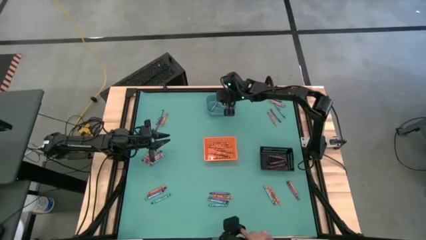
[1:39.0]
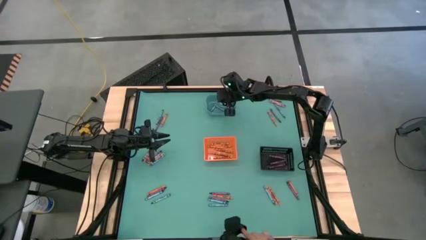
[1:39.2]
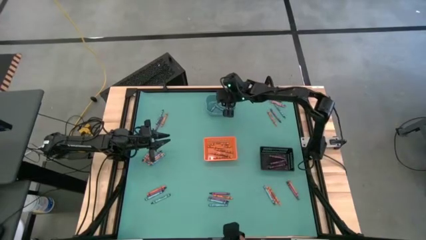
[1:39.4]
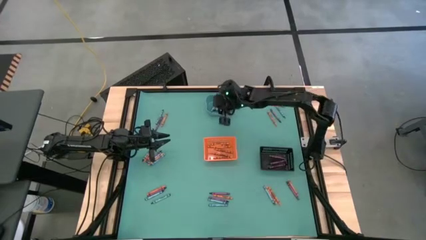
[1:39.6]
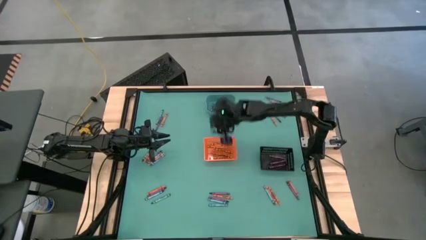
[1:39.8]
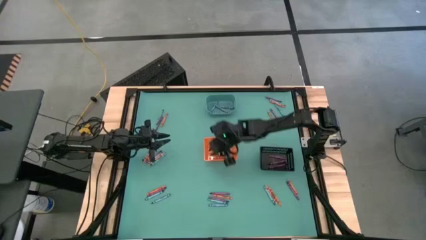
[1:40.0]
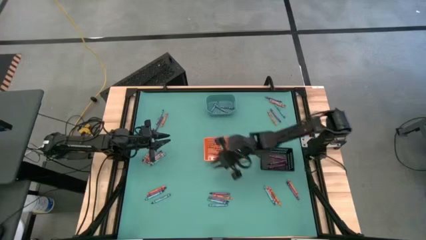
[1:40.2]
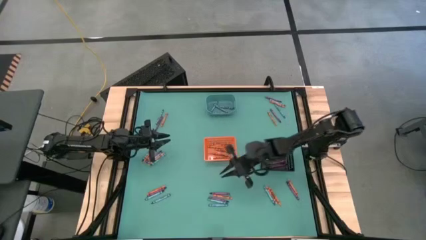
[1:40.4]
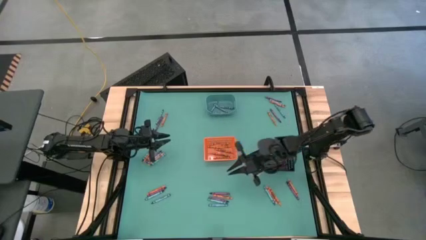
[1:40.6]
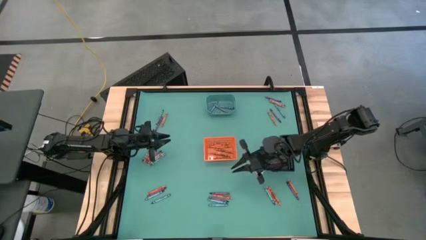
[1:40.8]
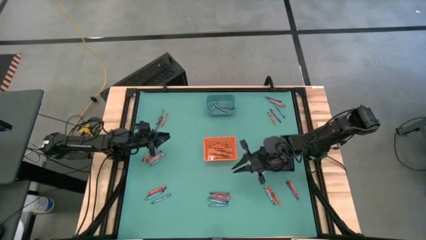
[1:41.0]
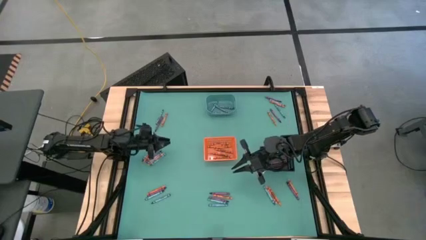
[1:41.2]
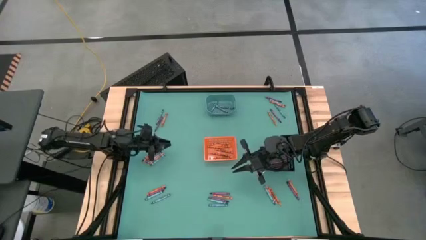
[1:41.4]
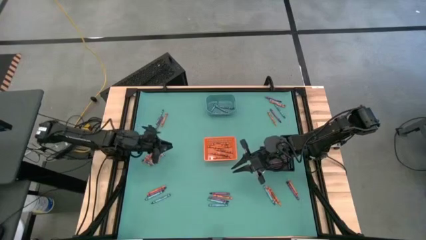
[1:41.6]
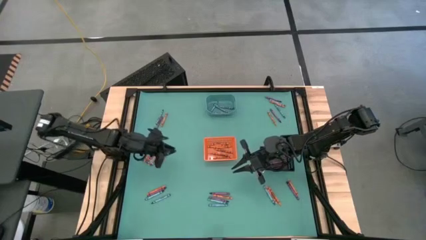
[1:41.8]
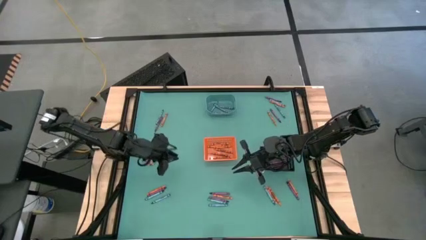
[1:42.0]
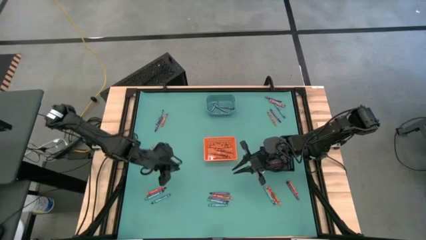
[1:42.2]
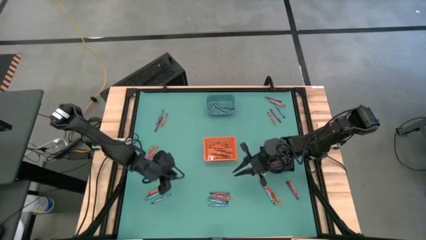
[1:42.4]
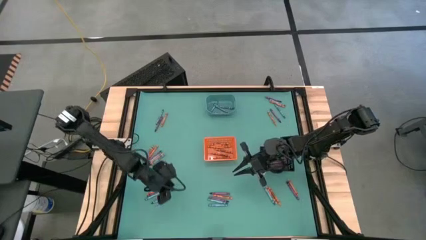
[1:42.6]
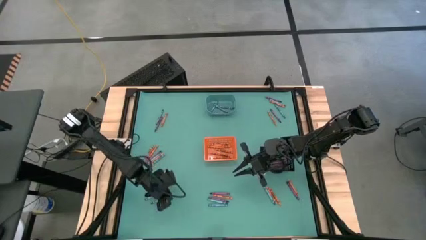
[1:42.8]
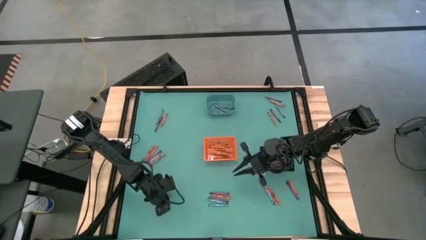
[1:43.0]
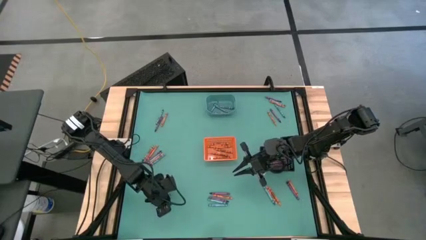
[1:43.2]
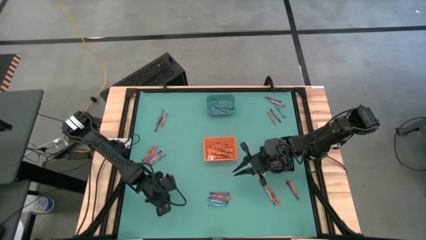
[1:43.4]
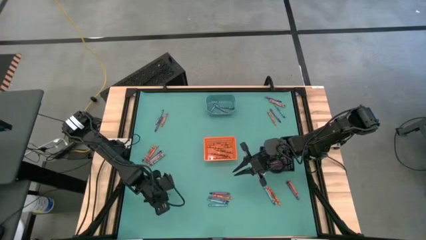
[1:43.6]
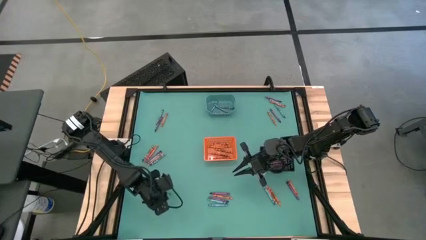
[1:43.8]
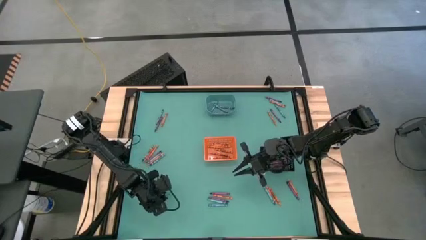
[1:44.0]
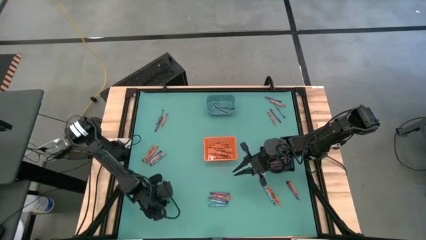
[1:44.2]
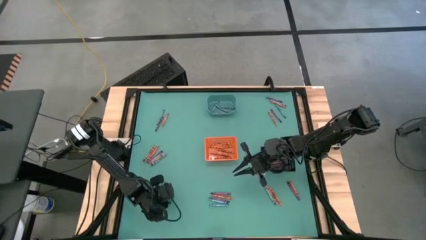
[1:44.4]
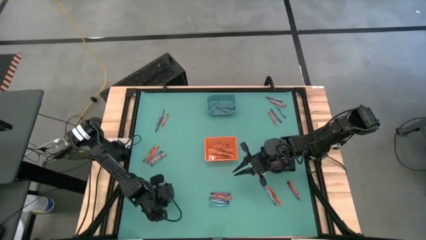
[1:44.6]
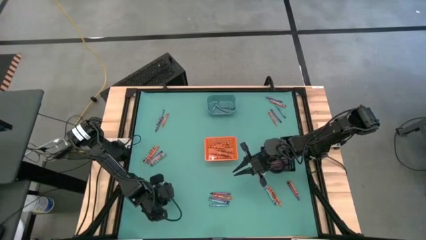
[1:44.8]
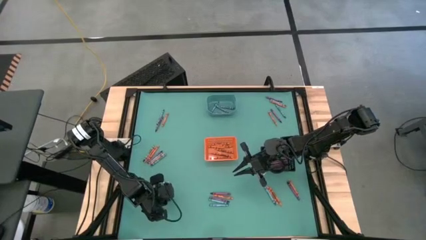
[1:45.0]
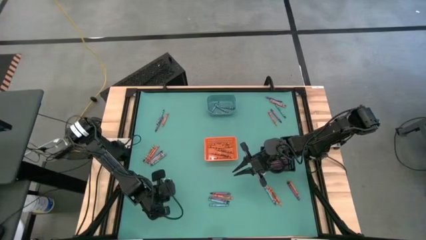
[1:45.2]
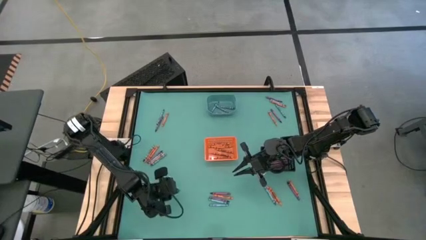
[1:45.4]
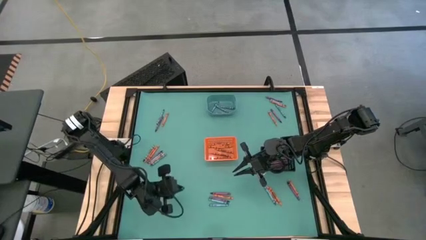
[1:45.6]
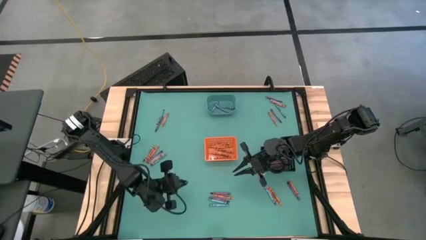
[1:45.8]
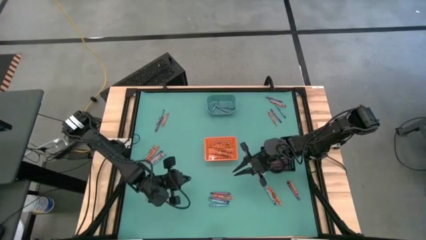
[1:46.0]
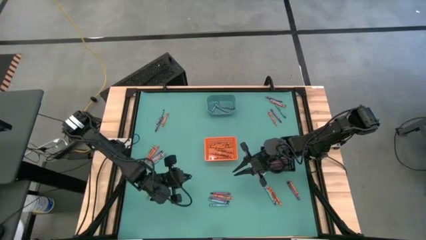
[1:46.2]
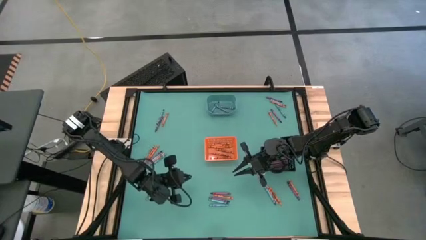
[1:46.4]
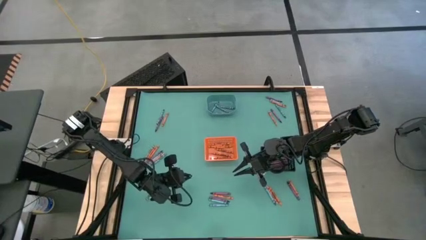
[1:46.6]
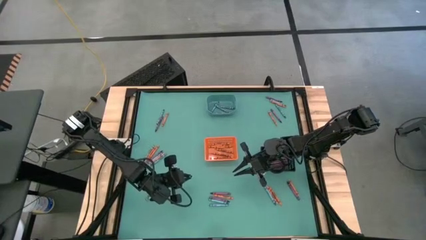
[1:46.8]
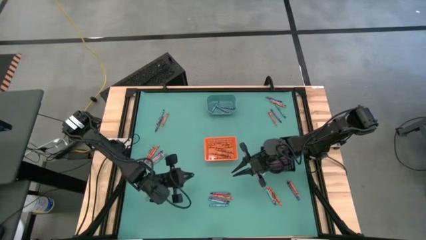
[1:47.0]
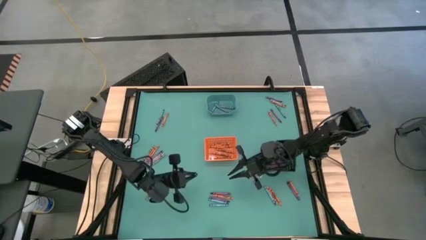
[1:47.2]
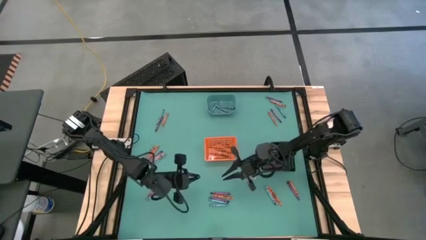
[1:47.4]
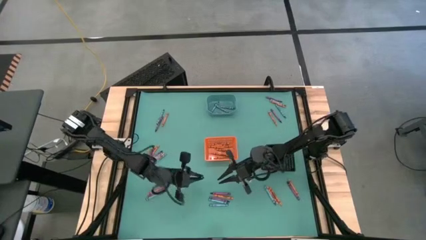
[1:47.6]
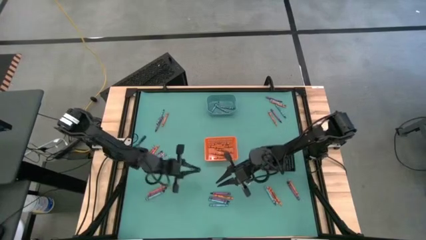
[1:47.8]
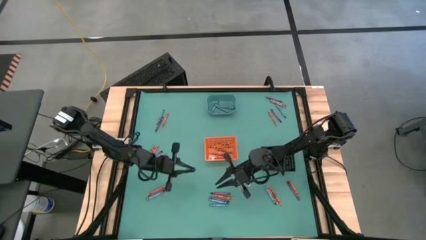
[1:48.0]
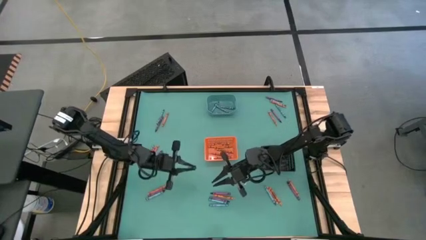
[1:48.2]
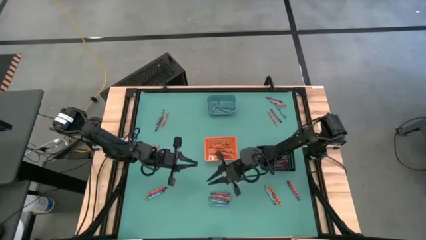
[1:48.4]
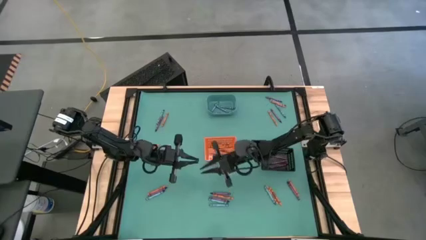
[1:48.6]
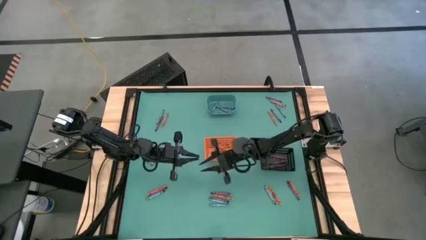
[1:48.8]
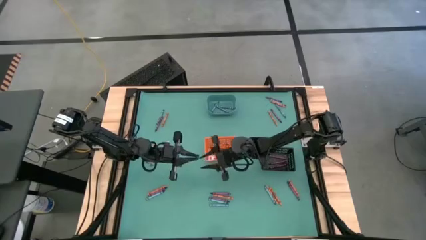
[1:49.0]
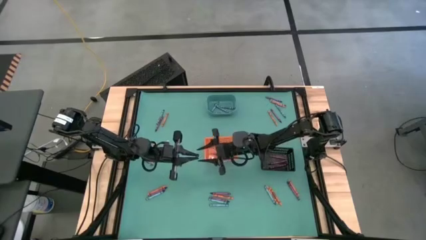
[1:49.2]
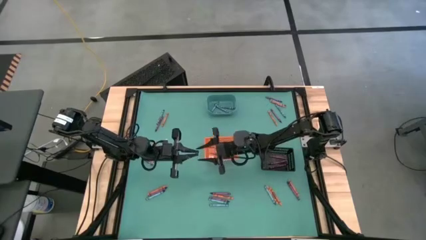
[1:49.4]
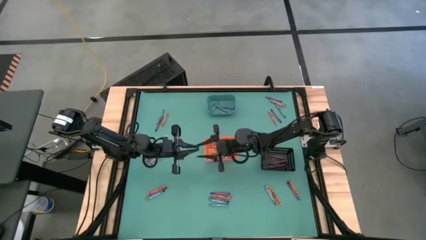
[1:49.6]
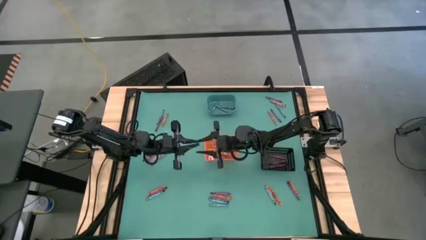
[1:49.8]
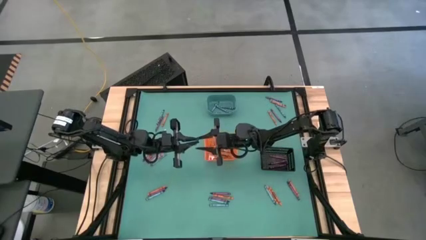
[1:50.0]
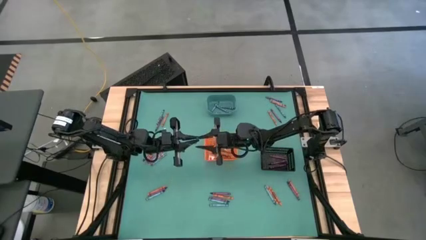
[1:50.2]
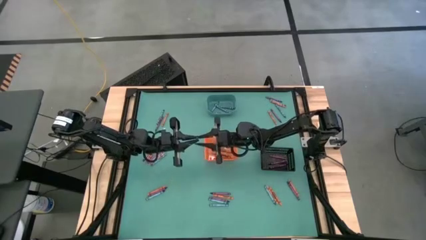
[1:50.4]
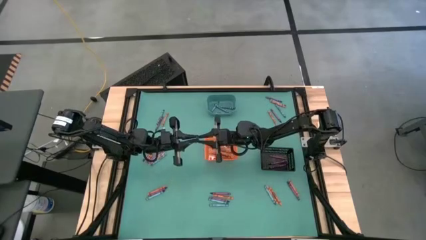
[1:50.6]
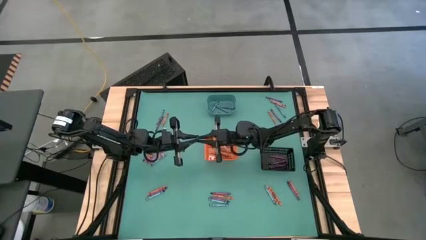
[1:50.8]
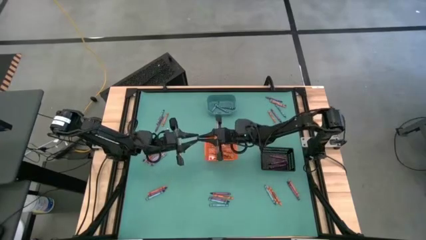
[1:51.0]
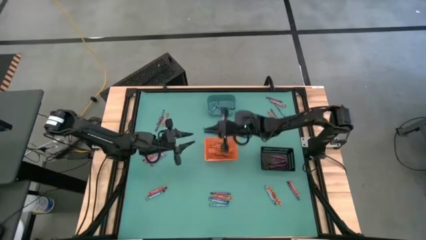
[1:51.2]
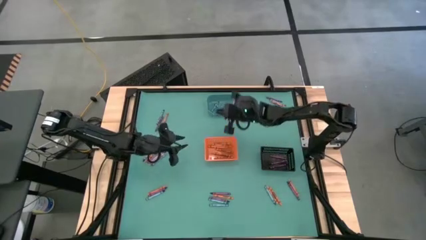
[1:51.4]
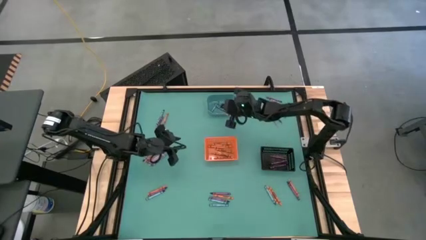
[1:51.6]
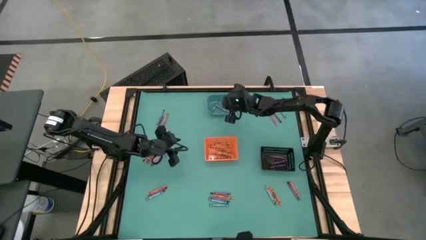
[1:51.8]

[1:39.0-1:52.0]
Task: Sort crayons
Put the blue crayon into the blue bin
